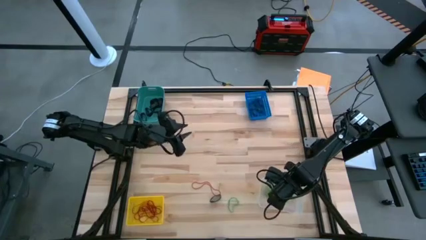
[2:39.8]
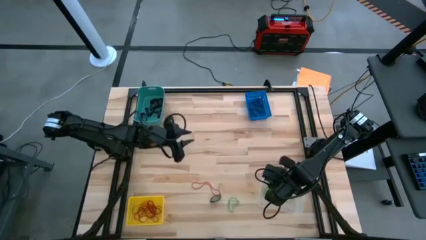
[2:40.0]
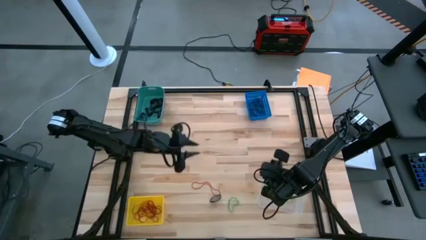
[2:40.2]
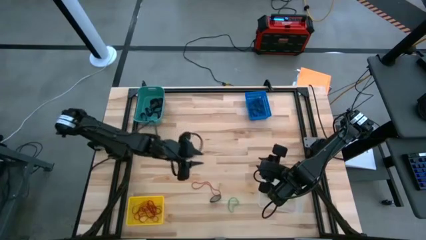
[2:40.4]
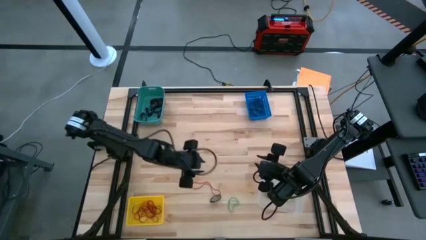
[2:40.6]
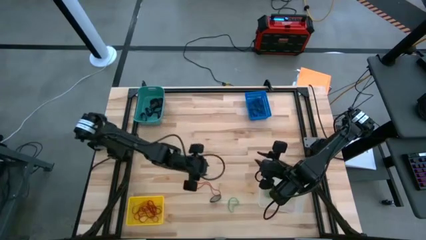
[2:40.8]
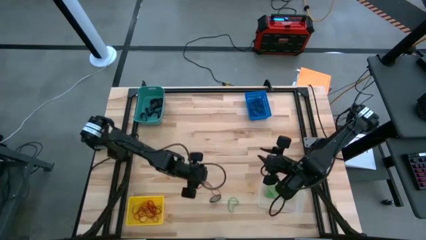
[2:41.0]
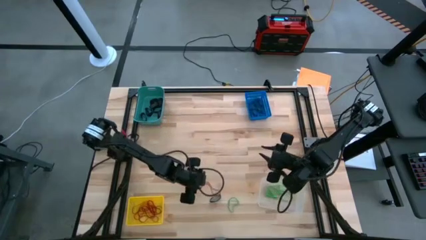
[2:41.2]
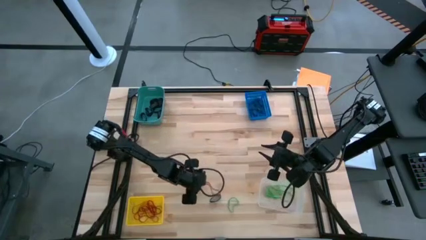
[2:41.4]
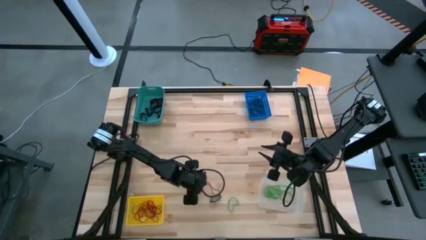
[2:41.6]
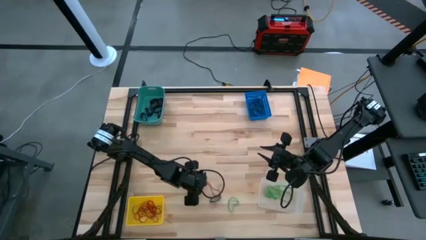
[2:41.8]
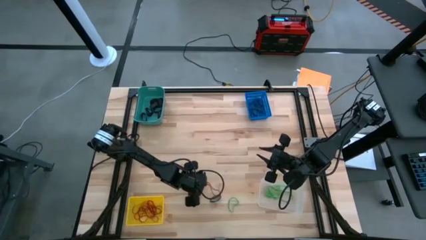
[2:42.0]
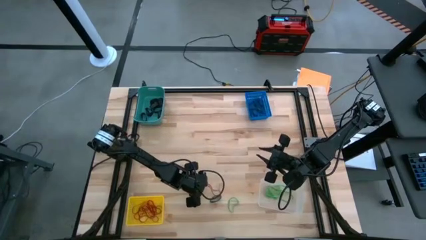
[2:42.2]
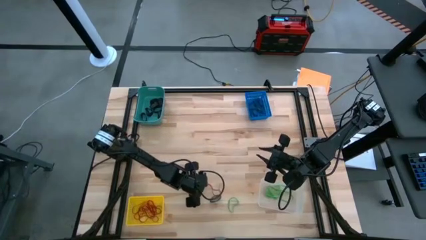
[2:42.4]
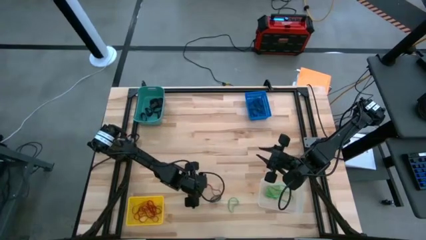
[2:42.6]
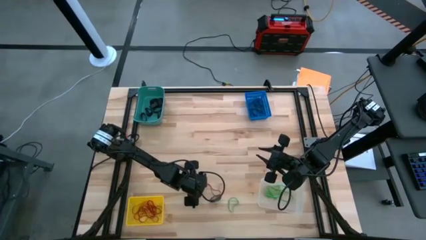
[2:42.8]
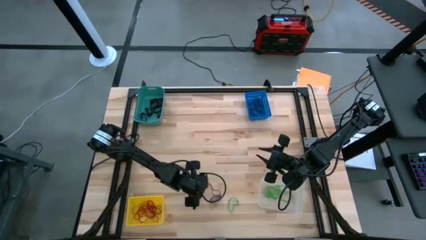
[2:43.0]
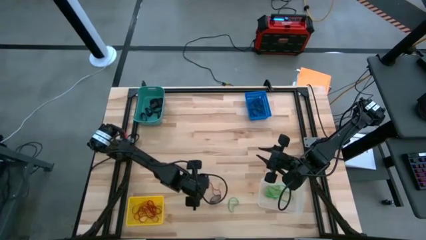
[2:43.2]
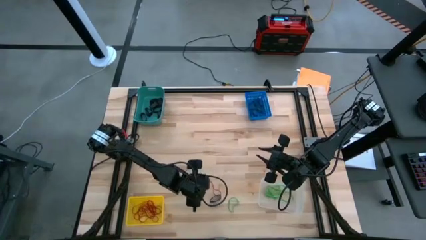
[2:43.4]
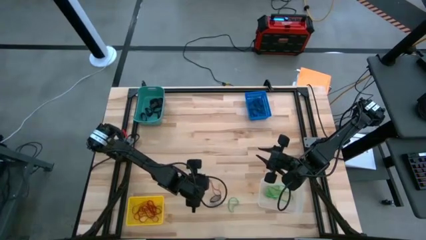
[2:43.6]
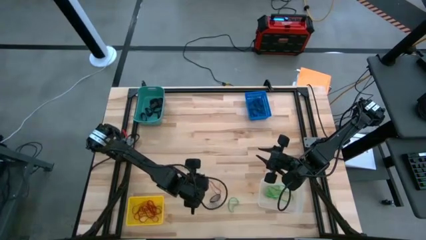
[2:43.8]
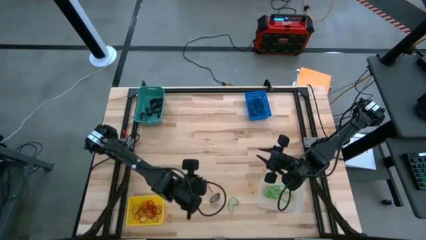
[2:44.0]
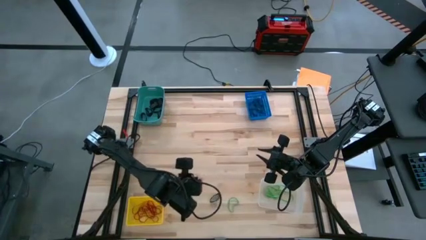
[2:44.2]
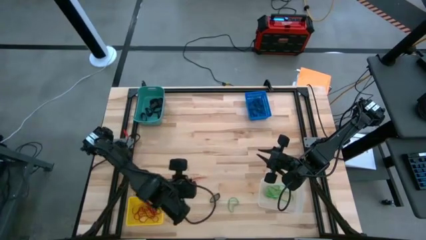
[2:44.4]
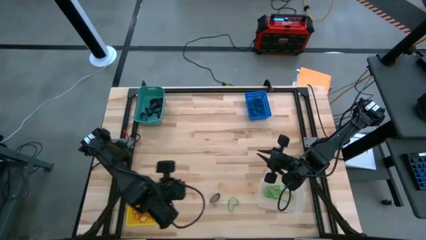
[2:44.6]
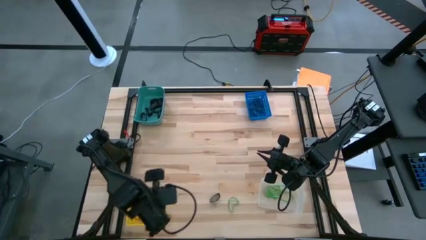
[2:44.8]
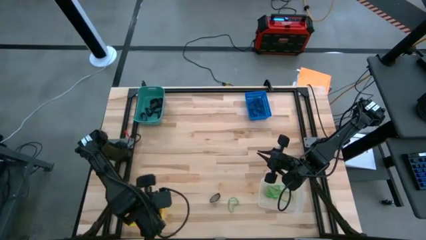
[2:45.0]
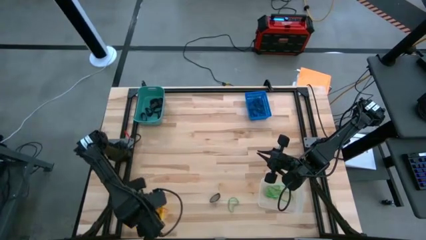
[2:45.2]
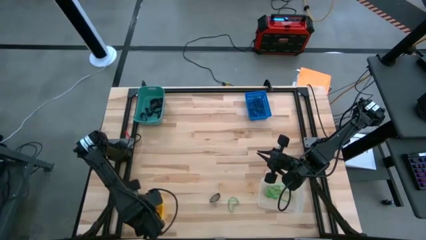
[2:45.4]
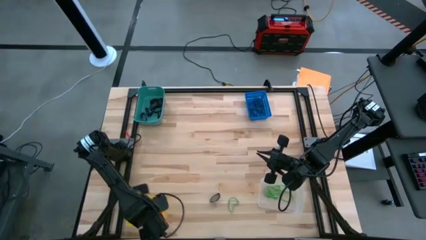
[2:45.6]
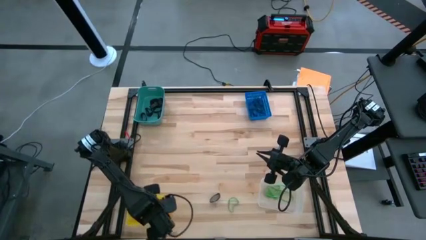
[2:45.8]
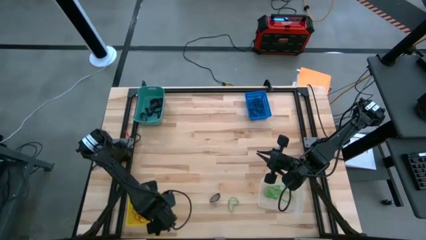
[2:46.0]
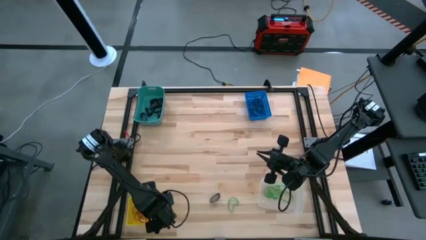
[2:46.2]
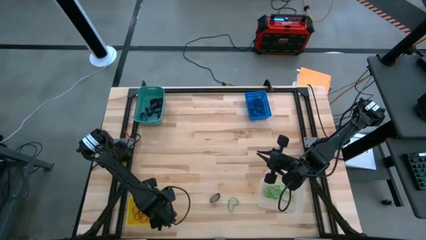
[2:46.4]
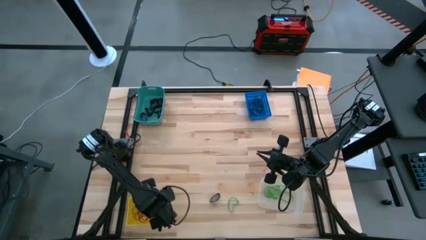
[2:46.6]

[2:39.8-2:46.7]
Task: Sort rubber bands into baskets
Put the red rubber band into the yellow basket

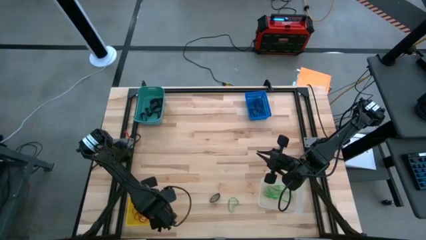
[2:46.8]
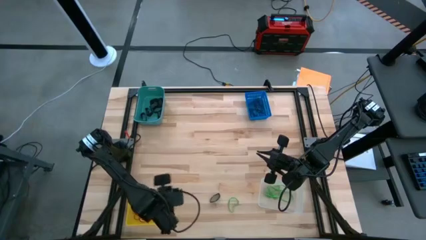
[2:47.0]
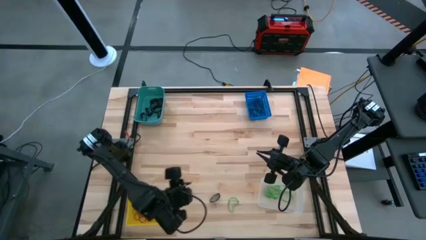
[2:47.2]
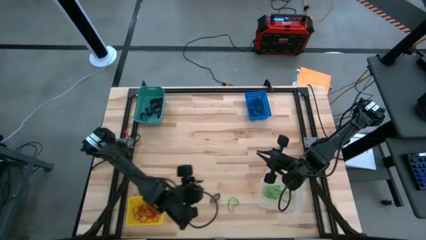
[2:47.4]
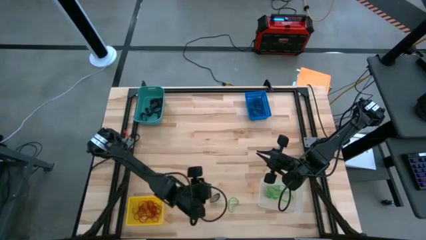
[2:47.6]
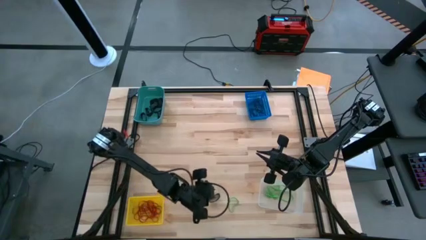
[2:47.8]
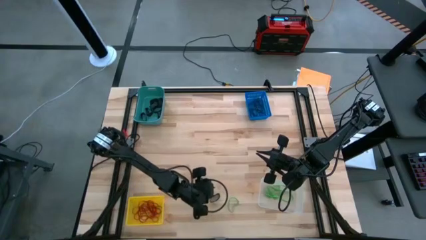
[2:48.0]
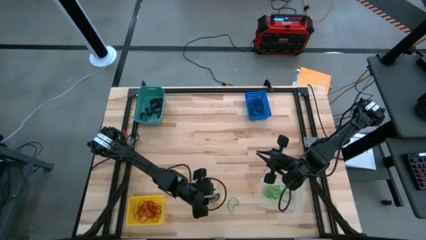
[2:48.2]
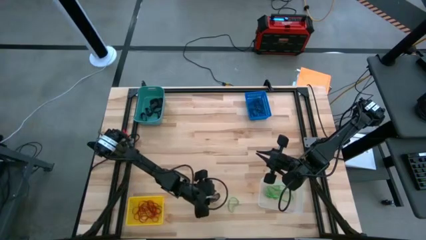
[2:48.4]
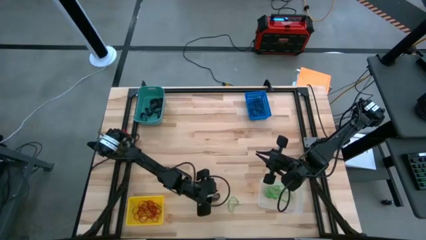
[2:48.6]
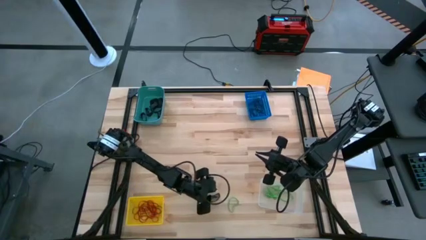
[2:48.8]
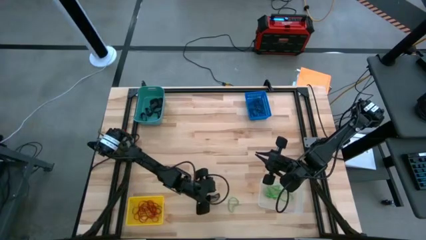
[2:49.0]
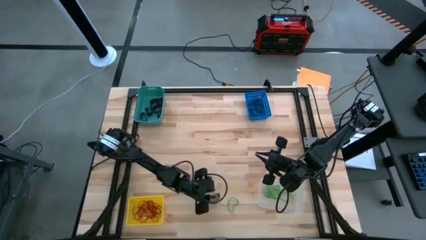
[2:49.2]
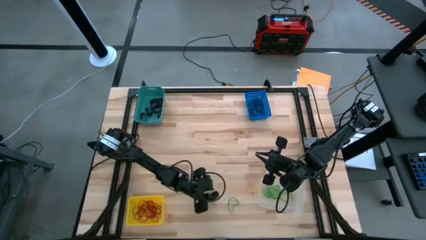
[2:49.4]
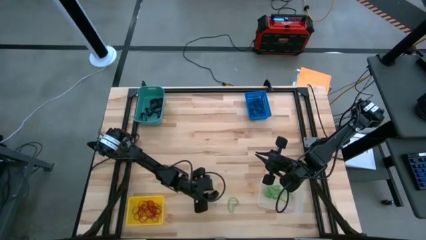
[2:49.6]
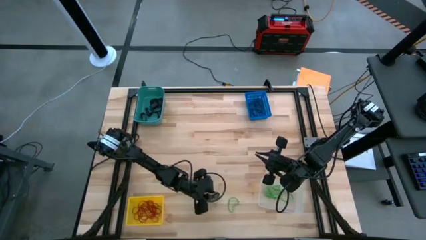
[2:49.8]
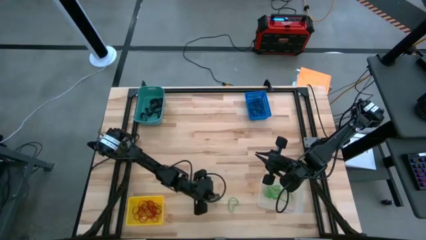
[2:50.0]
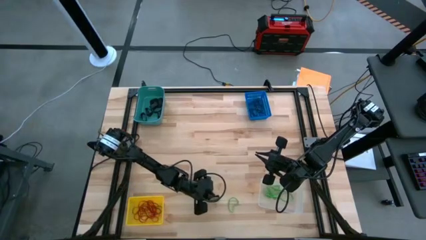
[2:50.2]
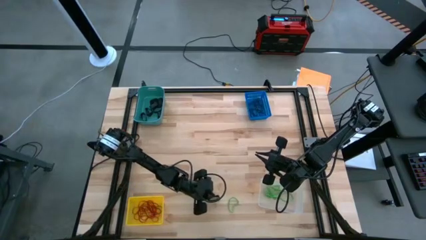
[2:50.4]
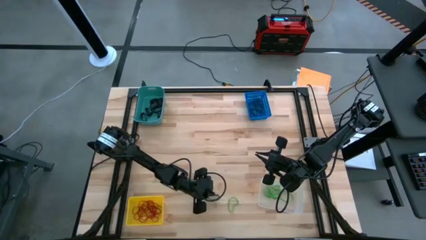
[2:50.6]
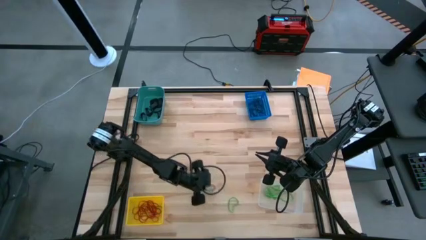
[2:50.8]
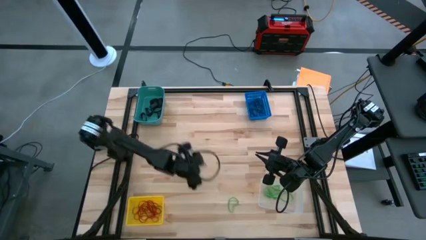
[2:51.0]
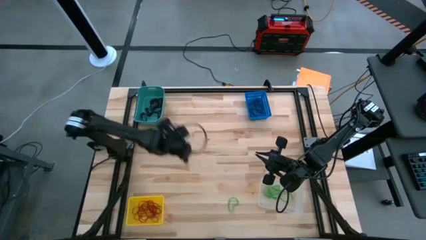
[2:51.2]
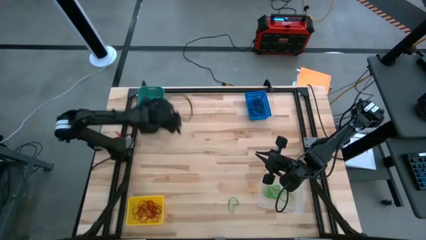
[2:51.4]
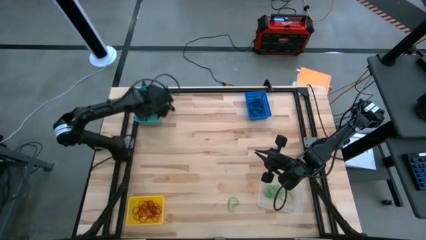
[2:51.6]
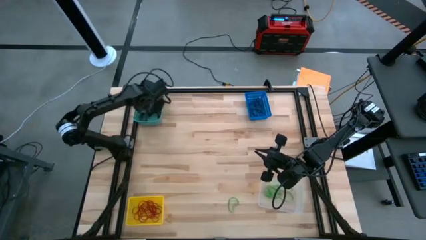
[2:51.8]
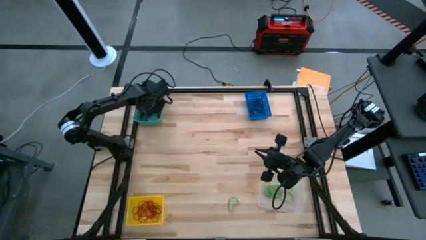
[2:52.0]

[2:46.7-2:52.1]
Put the thick black rubber band into the light blue bin

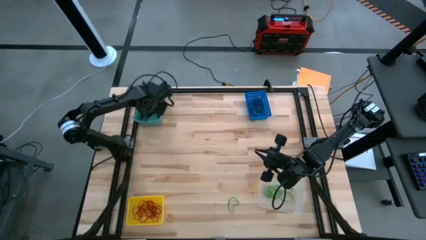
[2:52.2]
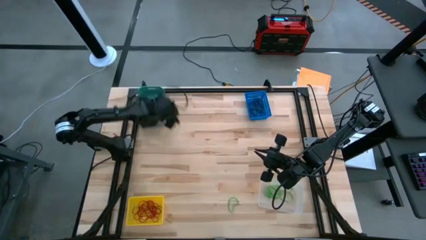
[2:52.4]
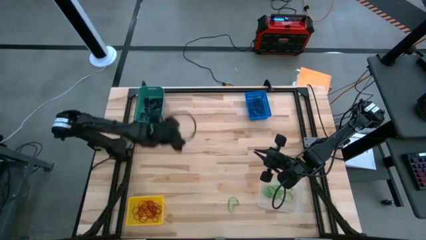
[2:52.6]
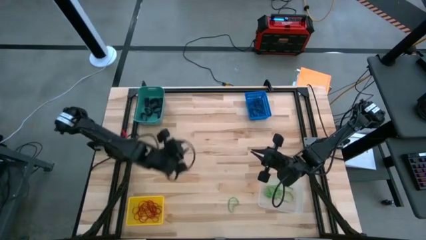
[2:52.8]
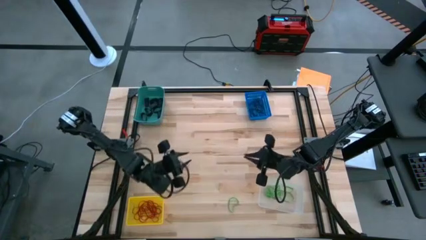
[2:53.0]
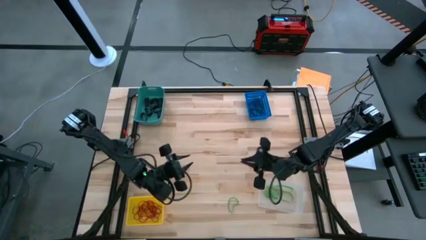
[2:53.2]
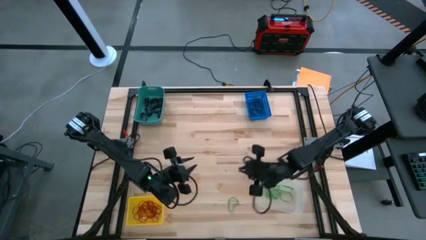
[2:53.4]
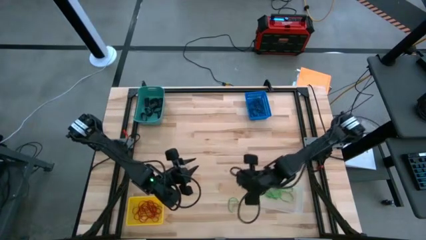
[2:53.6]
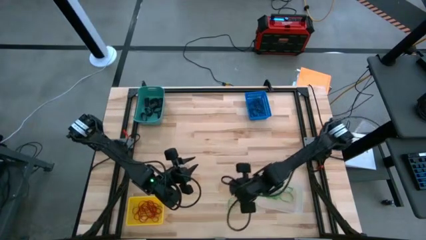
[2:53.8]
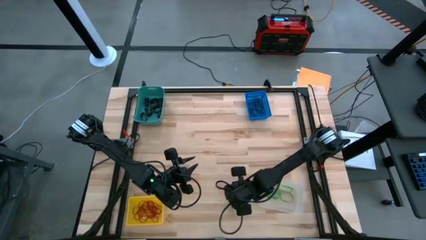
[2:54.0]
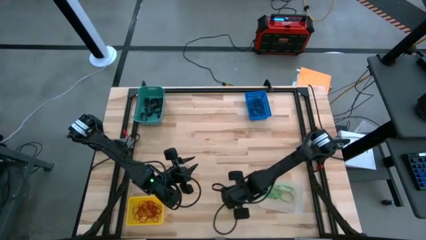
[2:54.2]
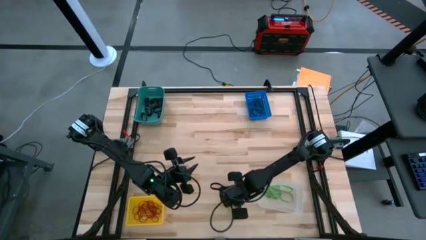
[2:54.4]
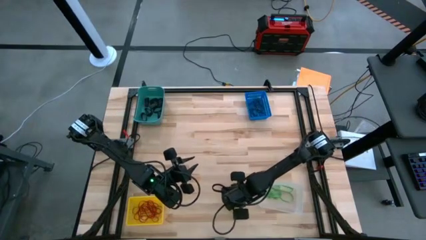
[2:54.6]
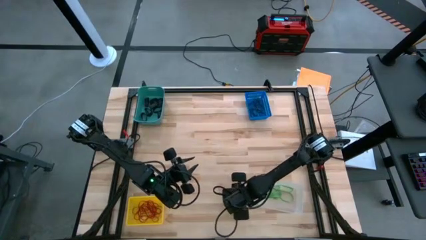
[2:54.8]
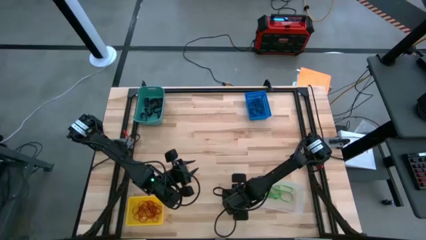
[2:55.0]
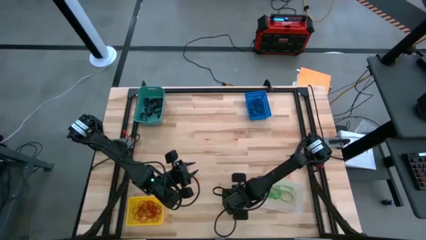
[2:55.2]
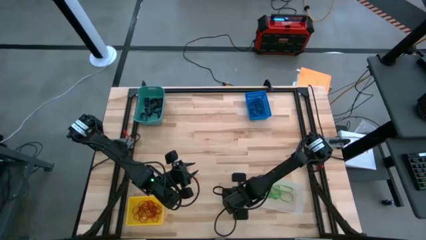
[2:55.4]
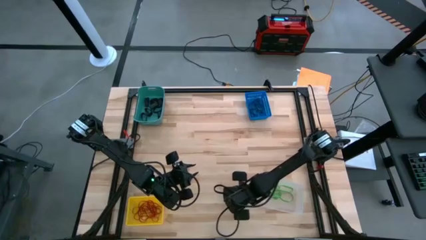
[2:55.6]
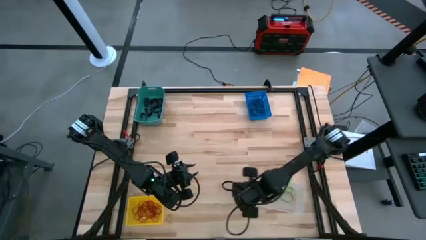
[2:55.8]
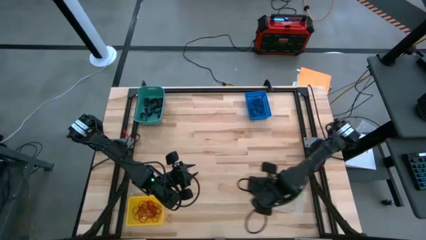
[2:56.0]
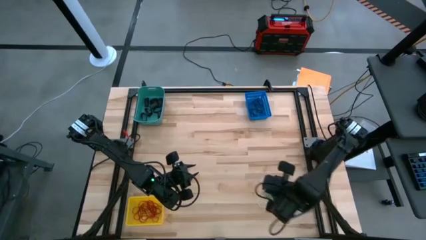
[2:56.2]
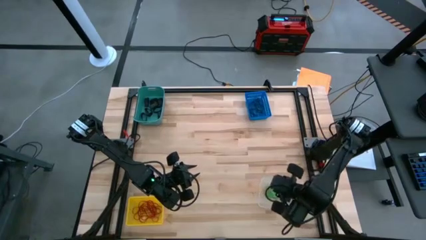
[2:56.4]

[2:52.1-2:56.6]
Put the green rubber band into the transparent bin
